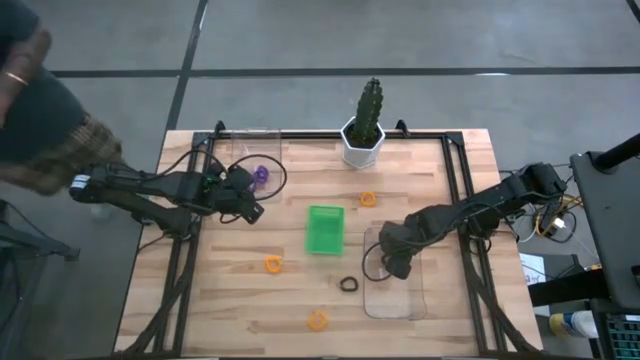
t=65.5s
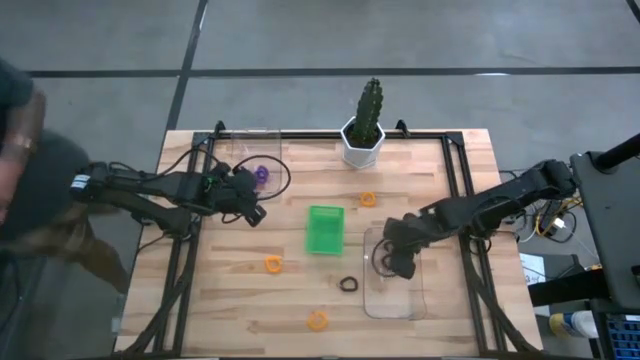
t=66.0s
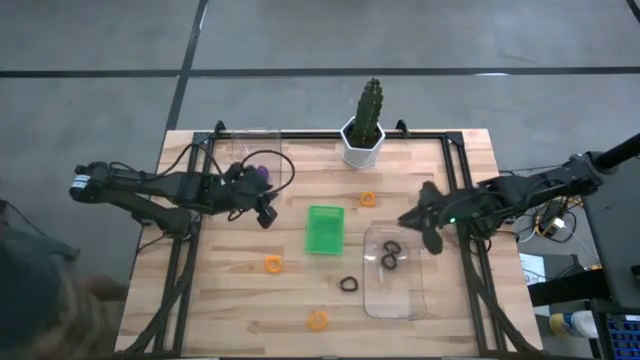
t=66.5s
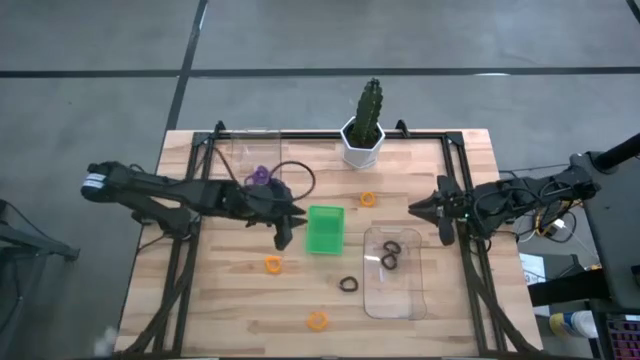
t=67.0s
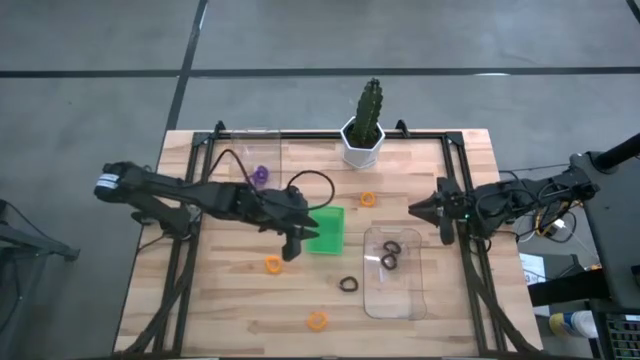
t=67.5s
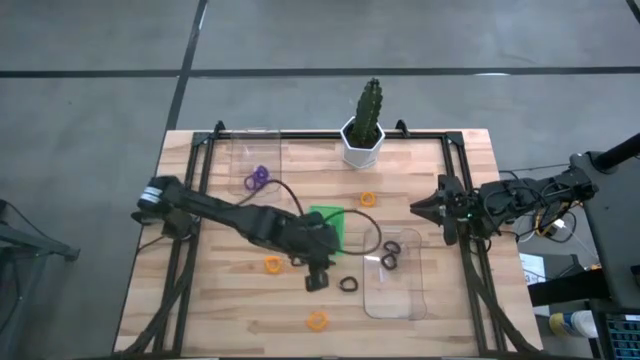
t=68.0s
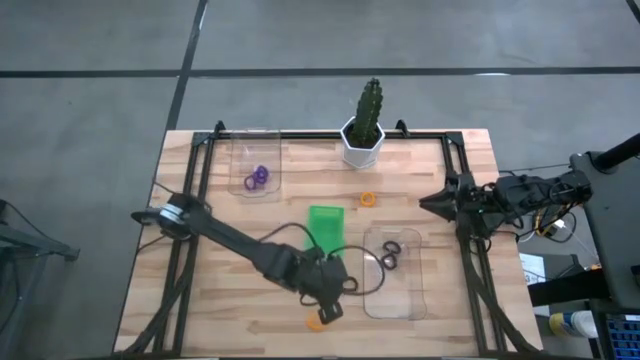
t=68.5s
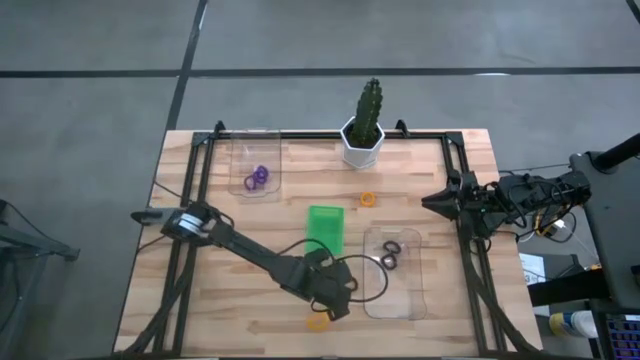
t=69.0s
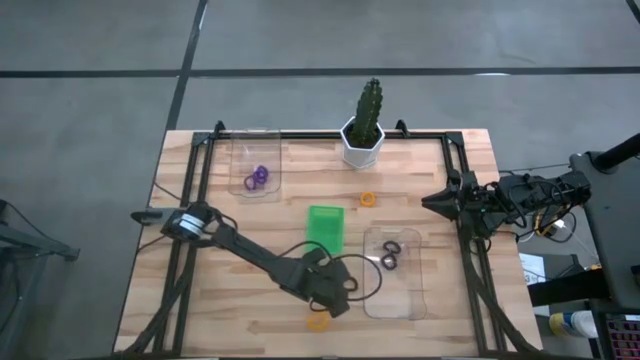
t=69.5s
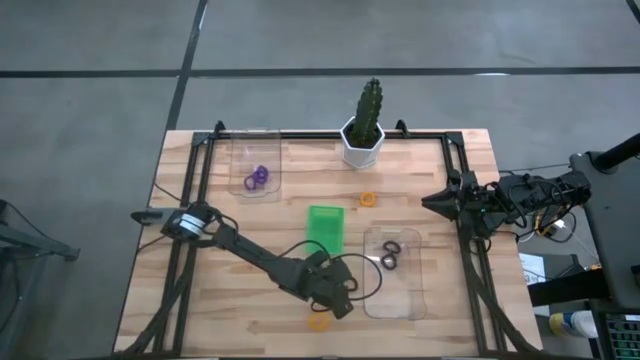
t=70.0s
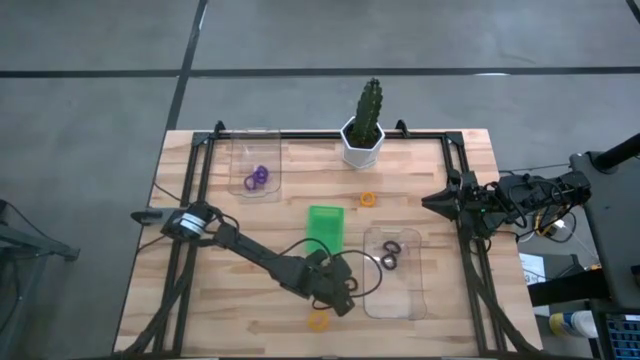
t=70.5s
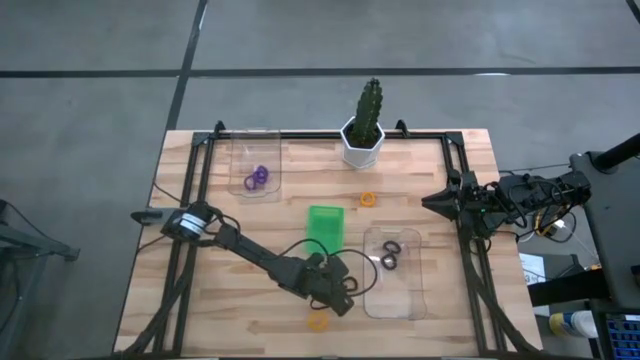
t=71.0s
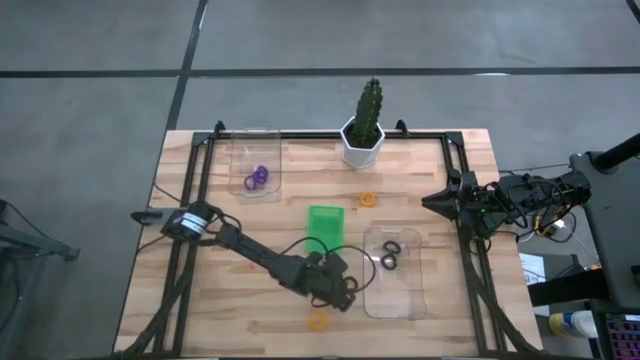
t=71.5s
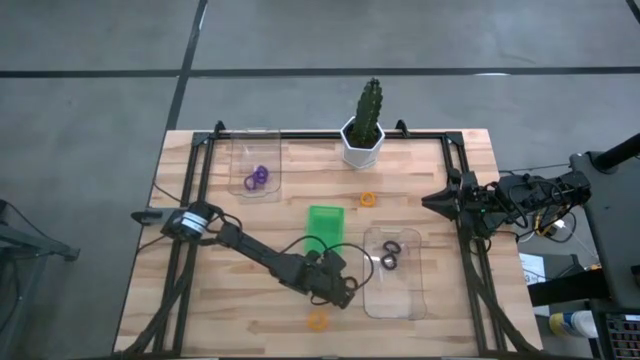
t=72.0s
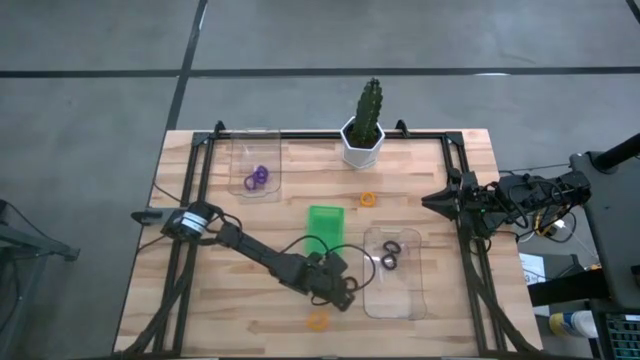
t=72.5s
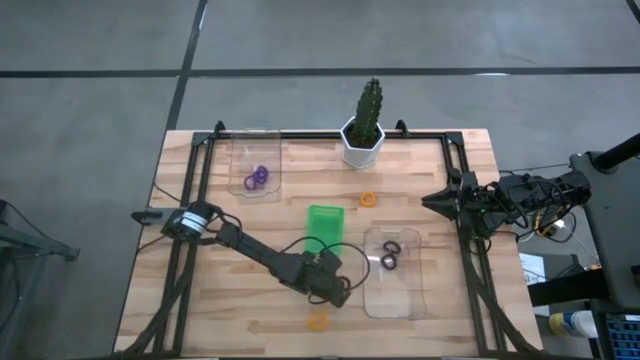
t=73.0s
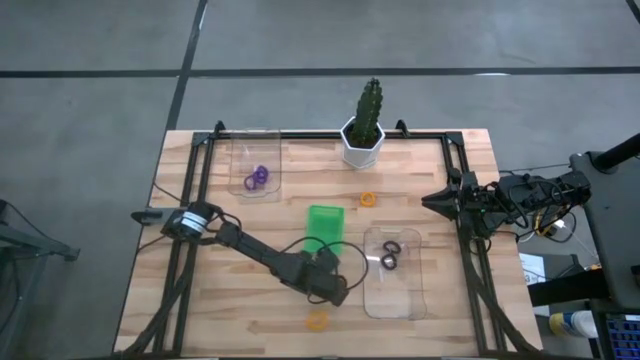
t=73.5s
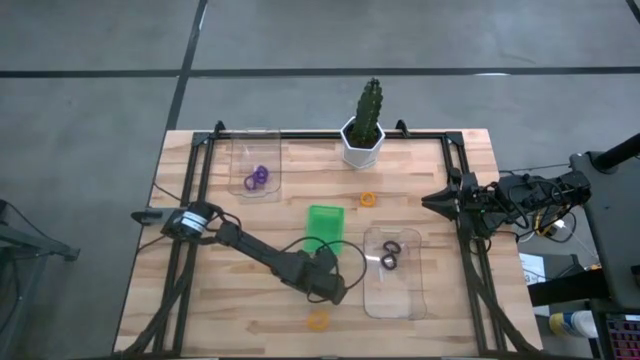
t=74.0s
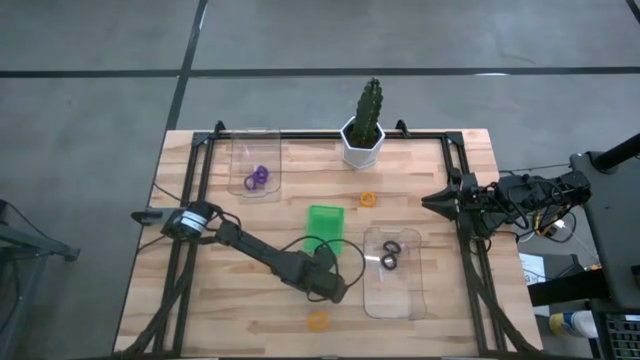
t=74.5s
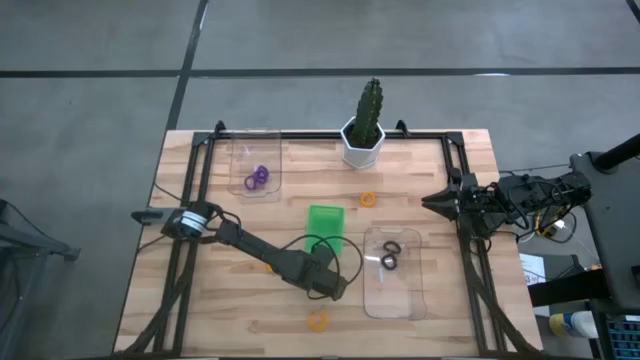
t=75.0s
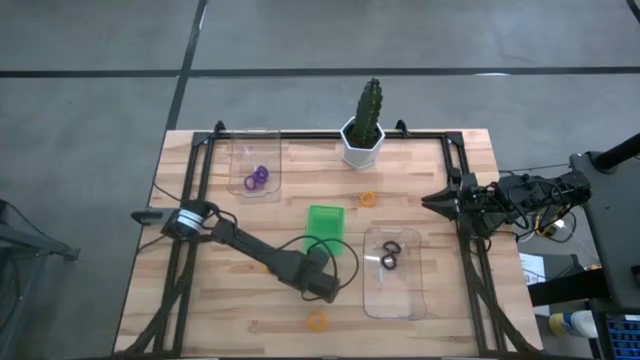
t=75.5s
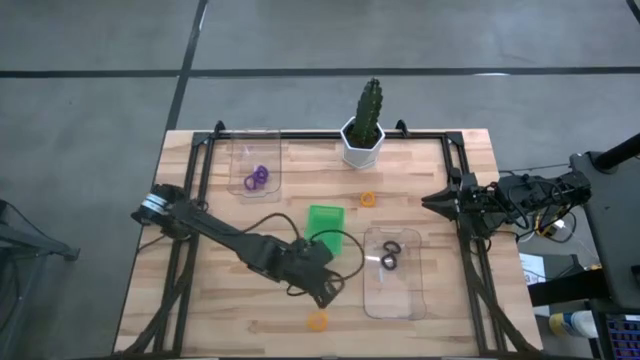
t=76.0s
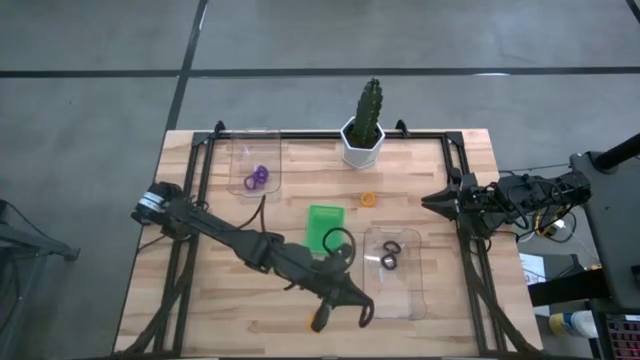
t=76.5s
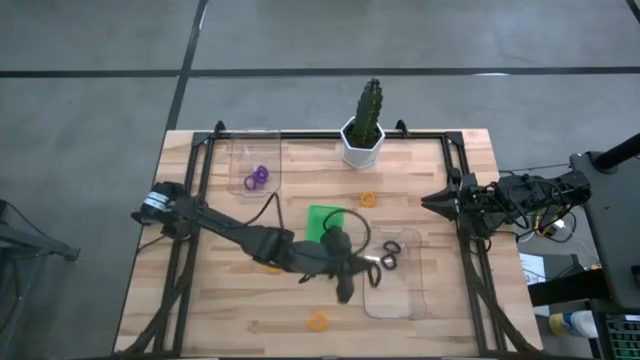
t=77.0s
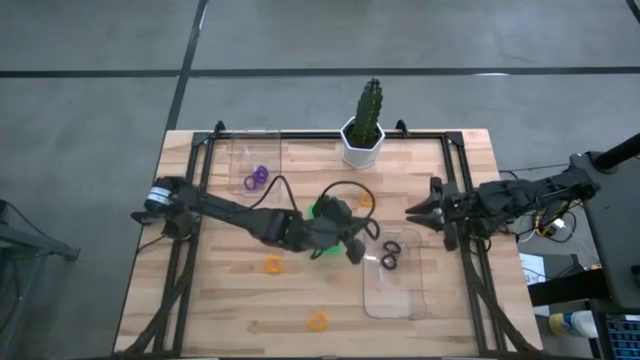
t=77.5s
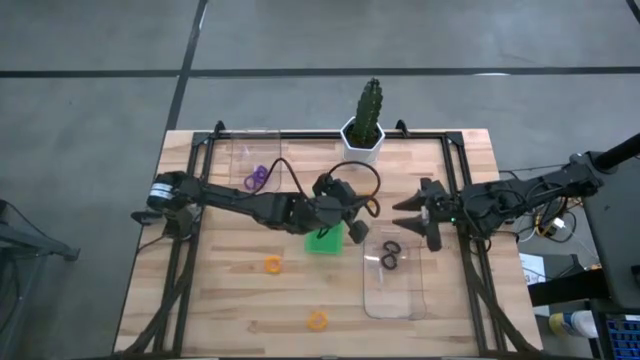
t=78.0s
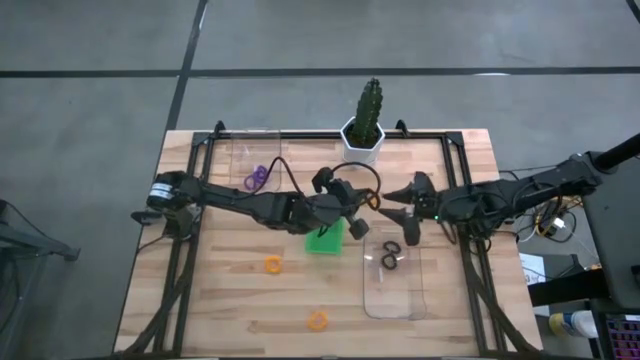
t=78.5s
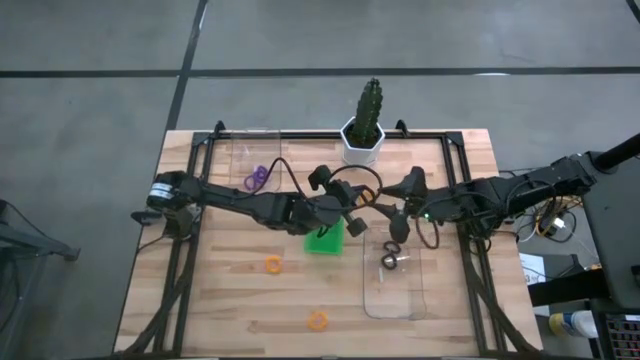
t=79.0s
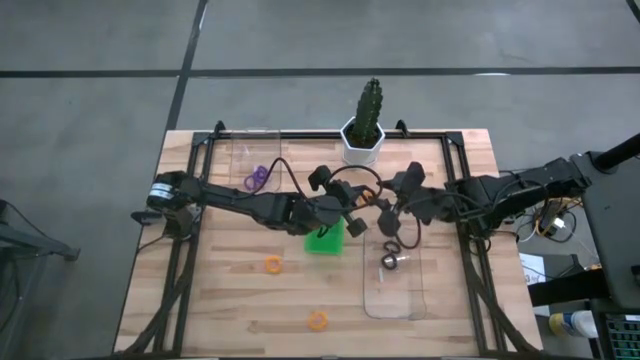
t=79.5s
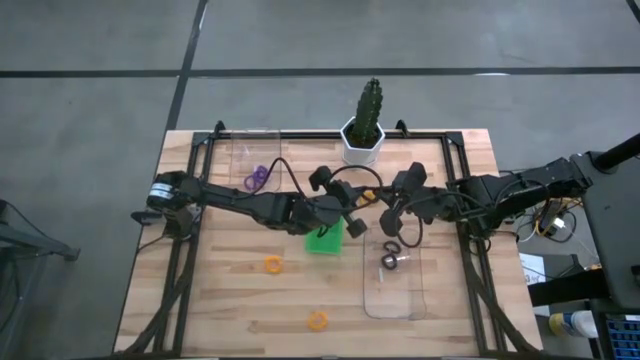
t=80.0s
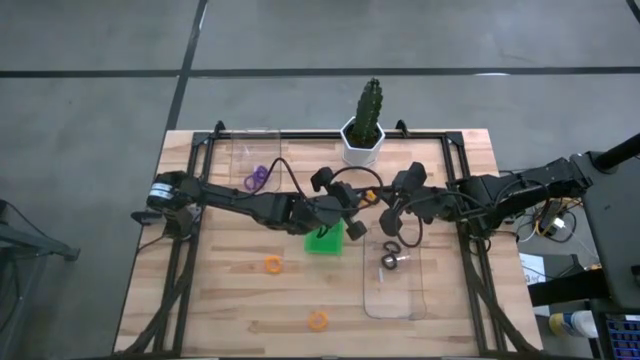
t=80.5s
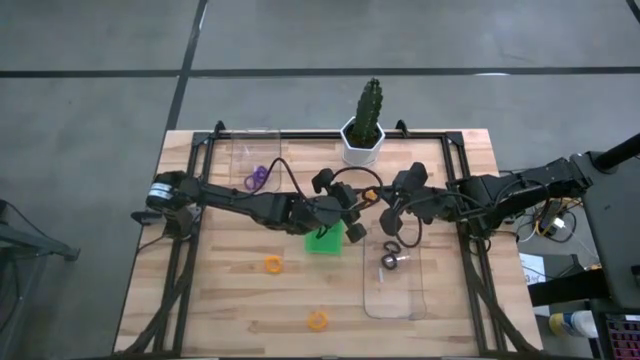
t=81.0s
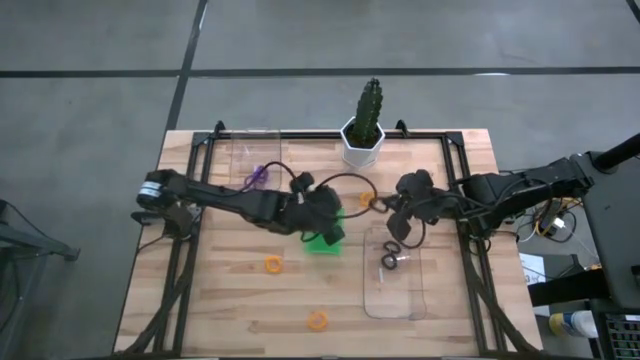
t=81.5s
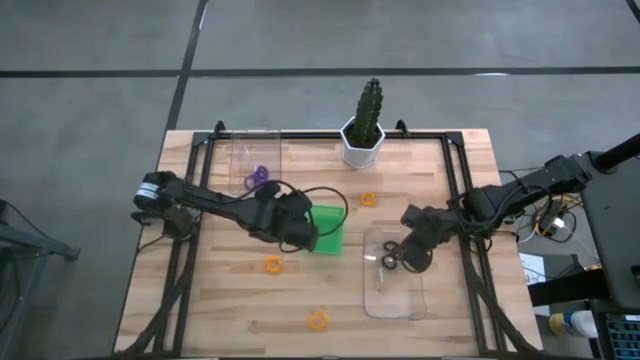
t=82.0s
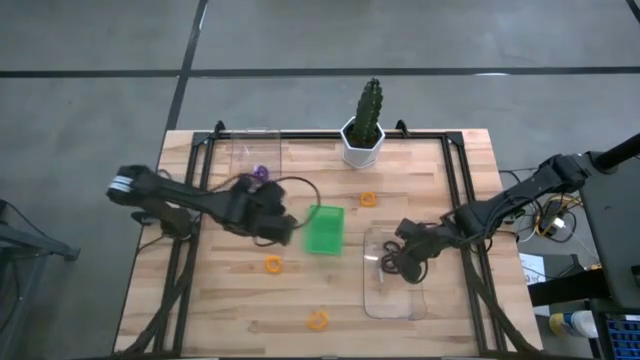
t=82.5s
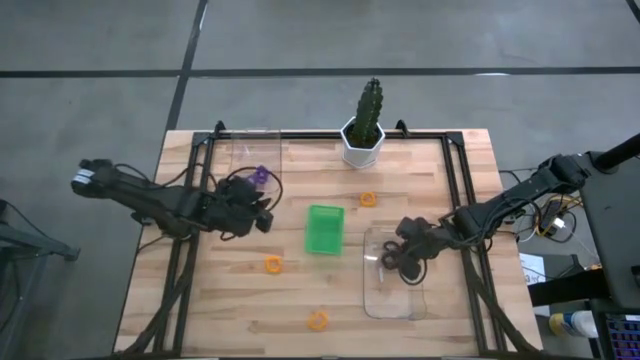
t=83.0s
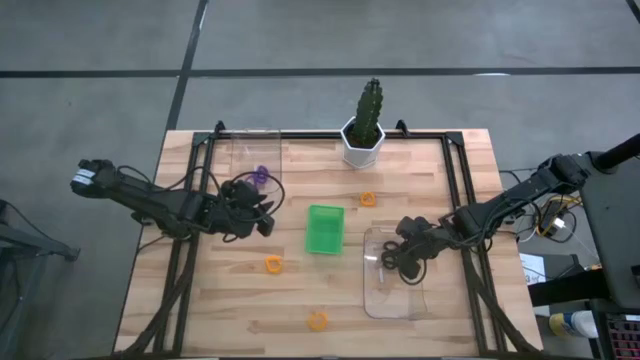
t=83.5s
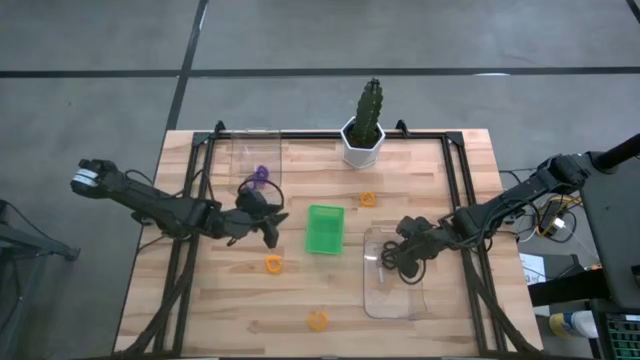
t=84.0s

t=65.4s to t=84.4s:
Task: Sort spring keychains
Put the black spring keychain into the bottom transparent bin

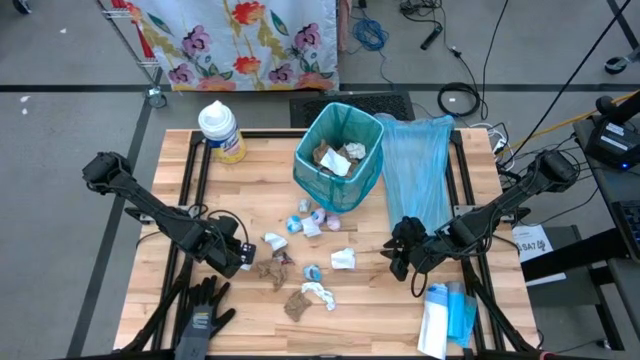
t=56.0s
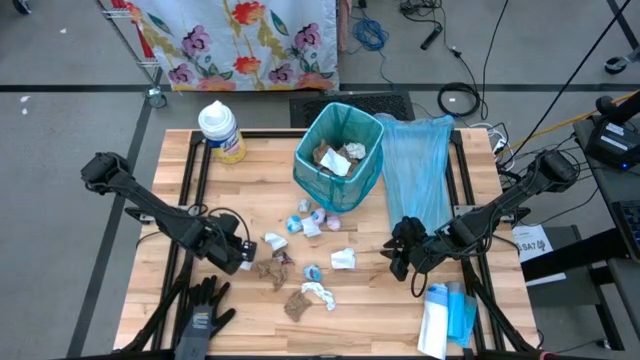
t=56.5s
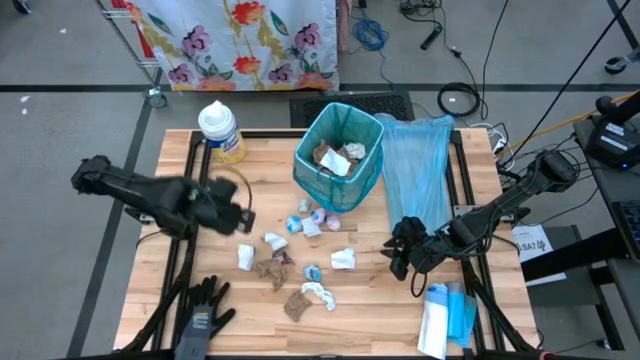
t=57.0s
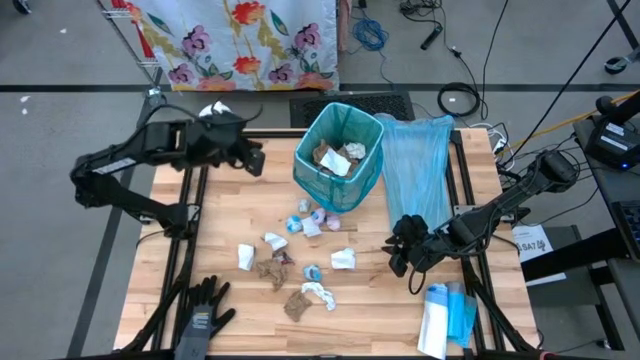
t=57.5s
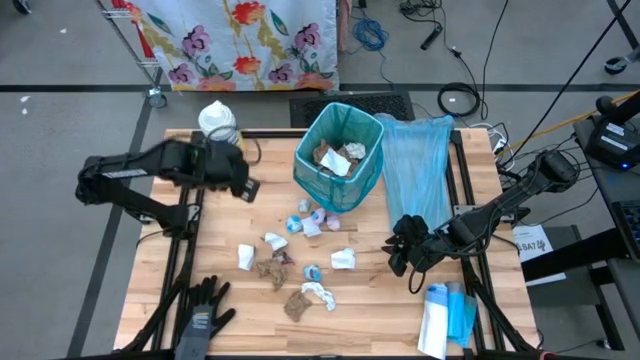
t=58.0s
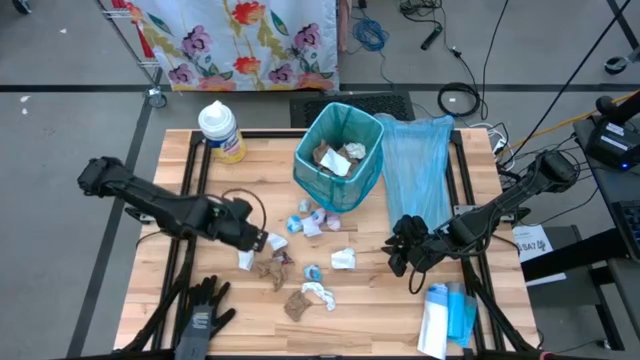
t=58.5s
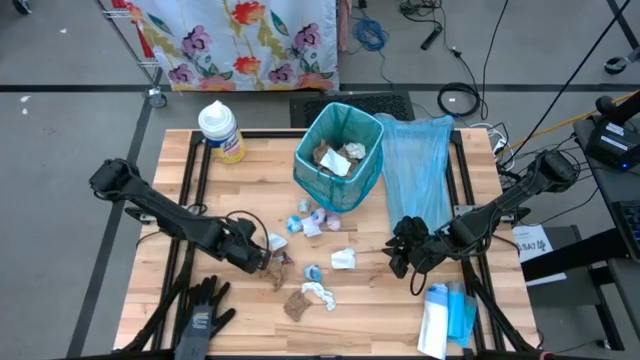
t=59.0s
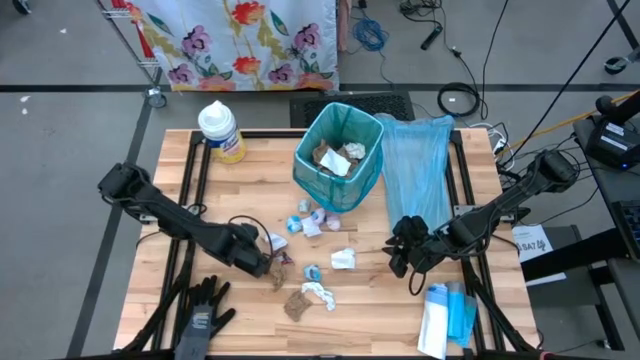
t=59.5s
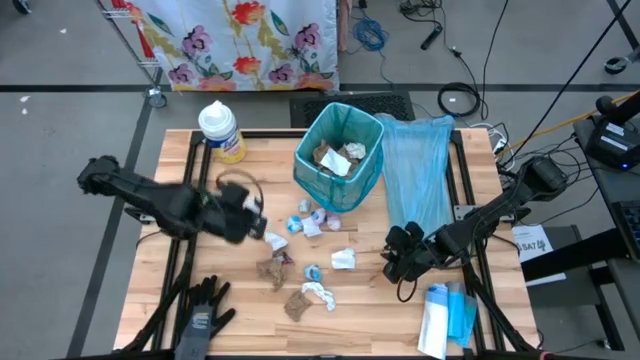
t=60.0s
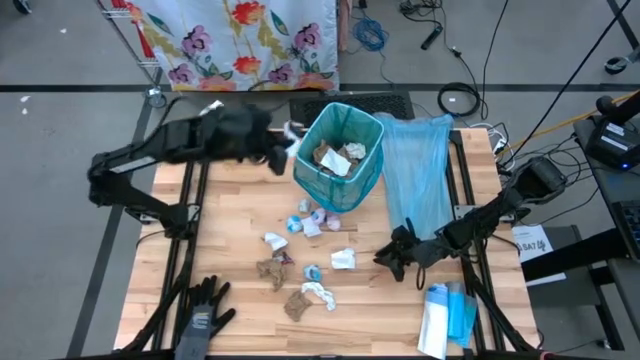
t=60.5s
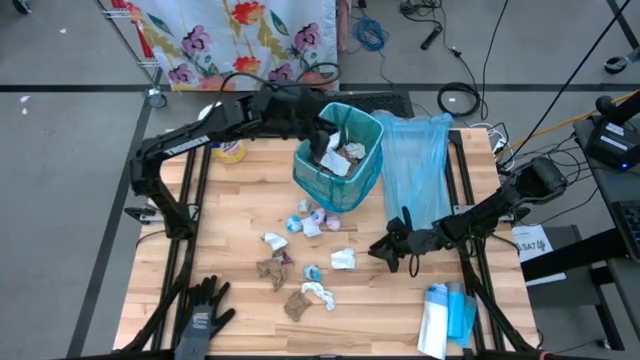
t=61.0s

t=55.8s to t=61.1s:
Task: place trash/remove bag and relplace
Put the white paper piece into the trash bin
